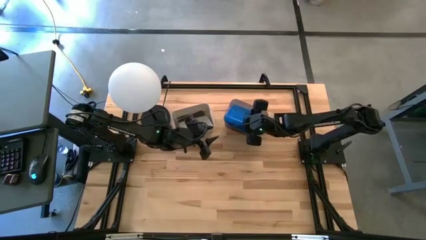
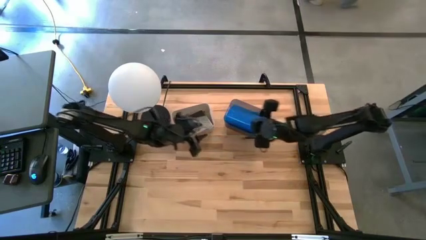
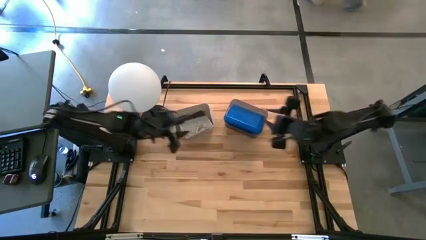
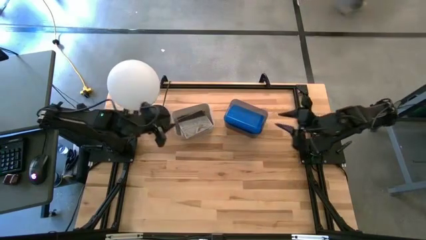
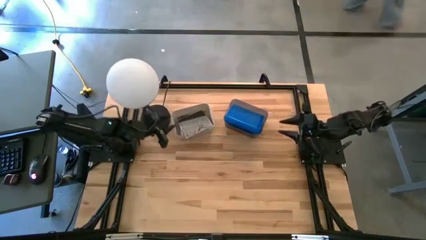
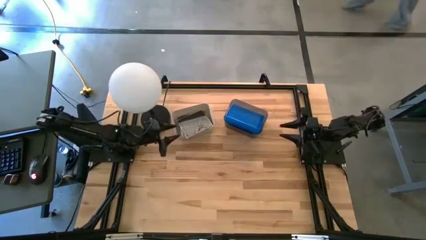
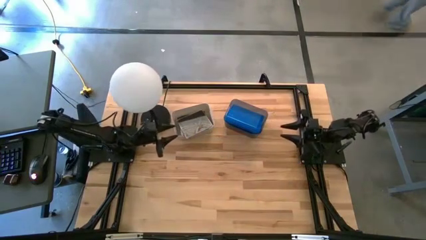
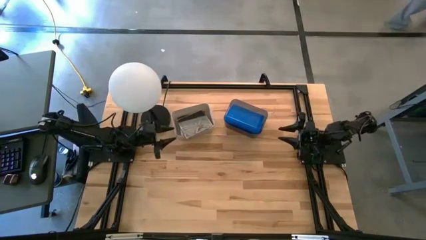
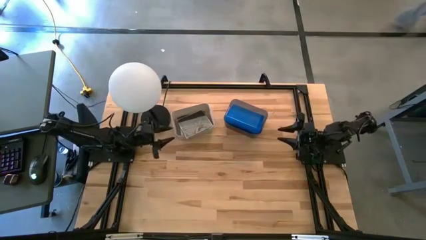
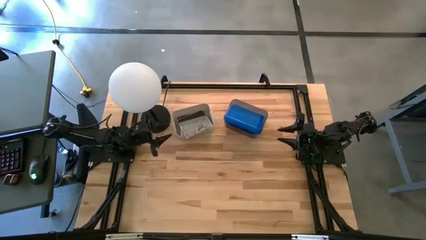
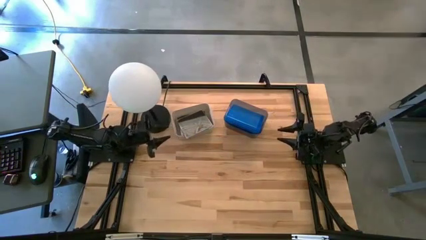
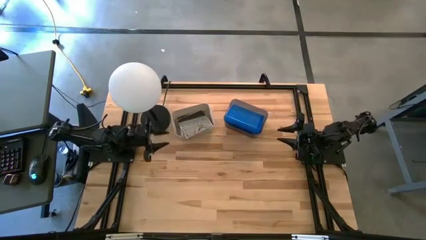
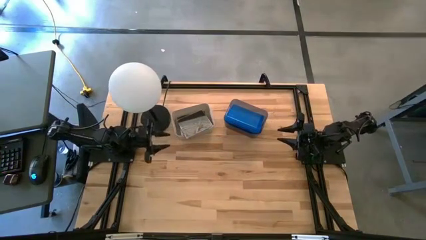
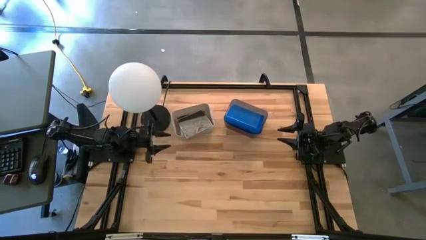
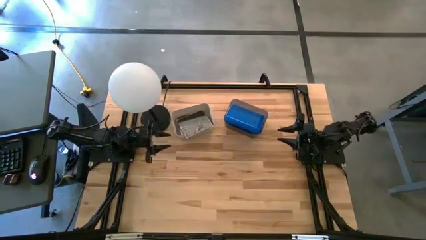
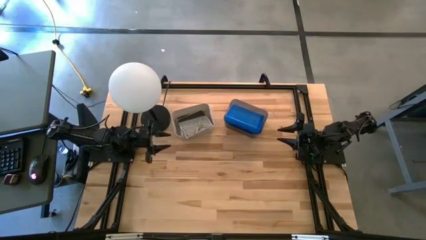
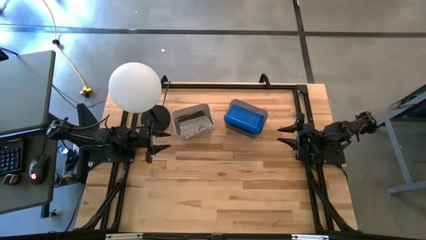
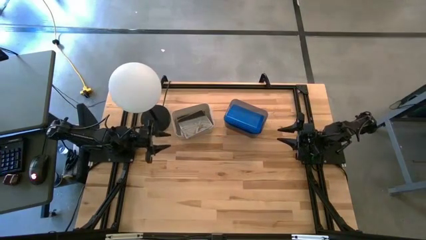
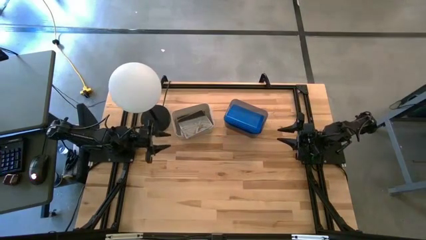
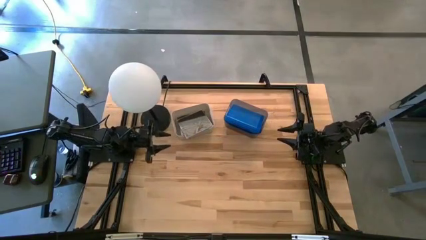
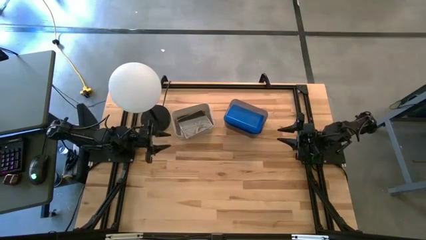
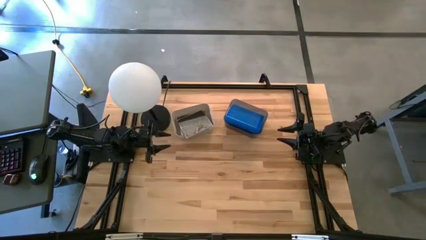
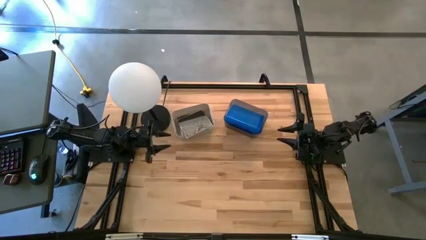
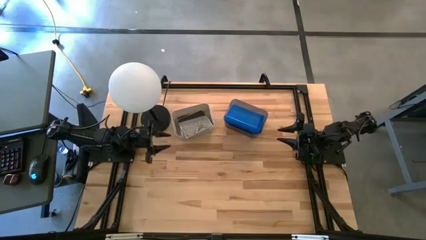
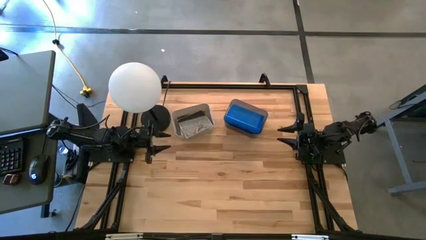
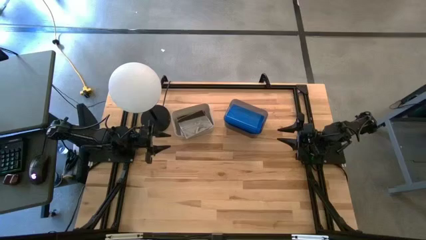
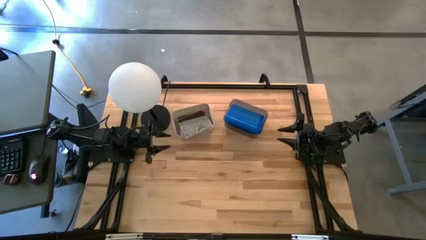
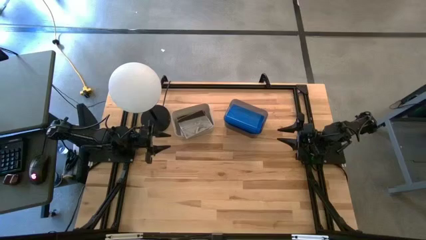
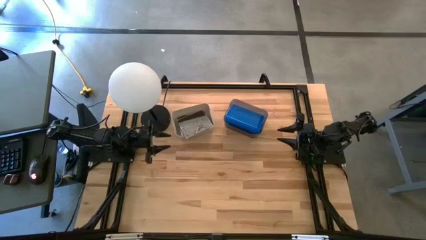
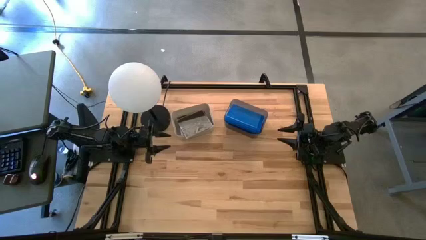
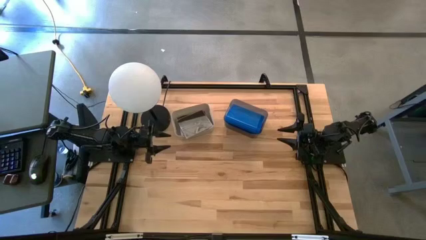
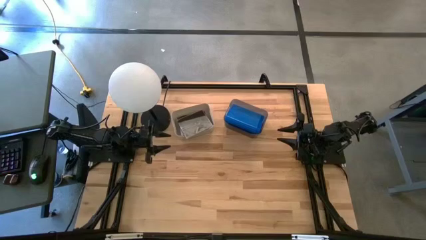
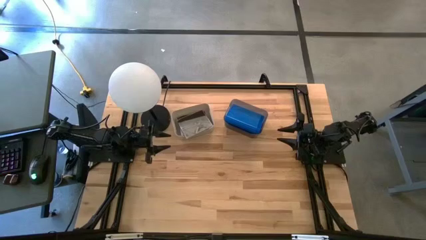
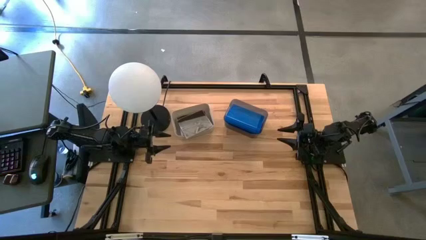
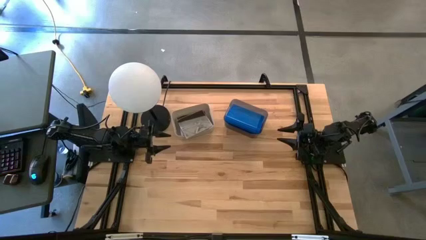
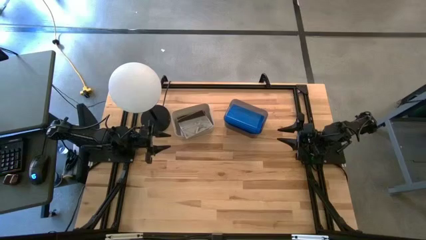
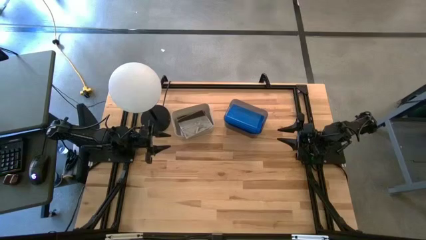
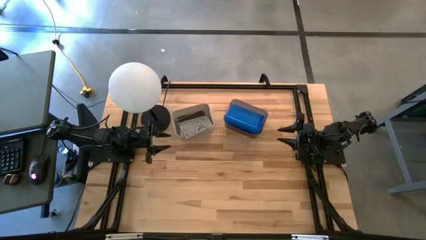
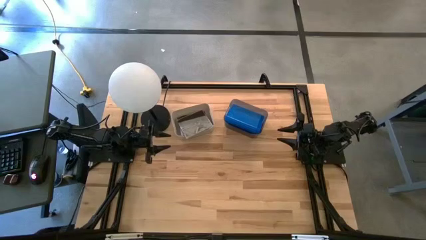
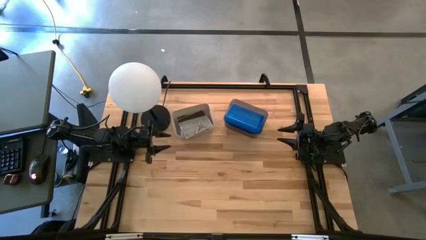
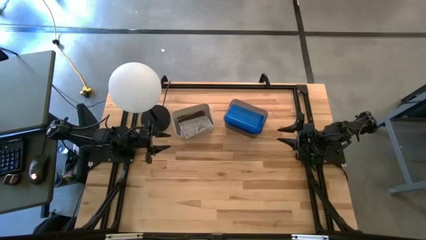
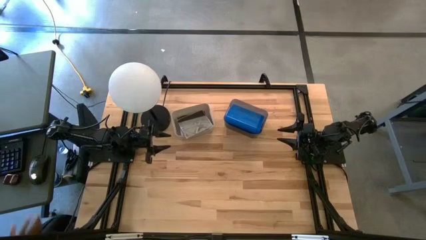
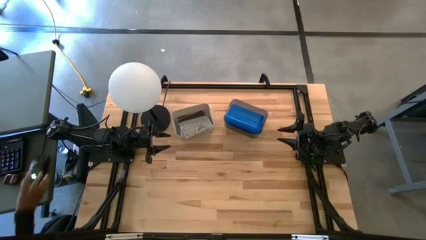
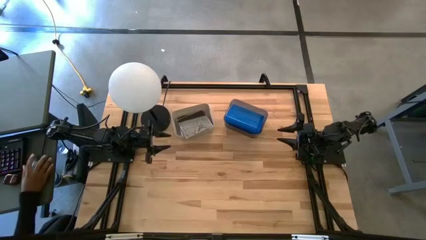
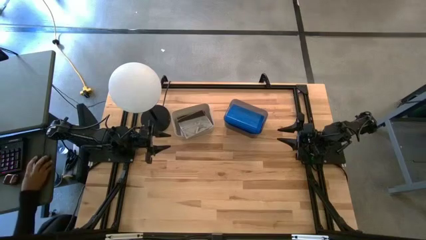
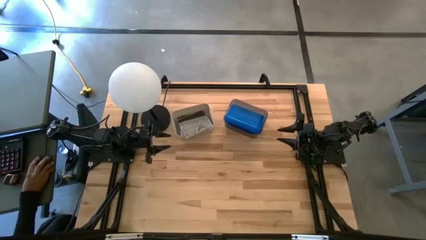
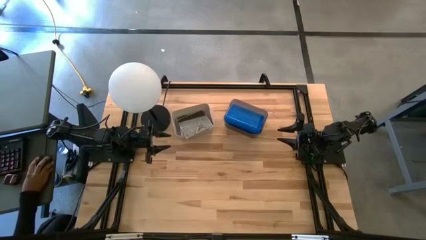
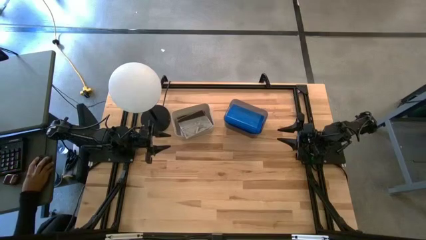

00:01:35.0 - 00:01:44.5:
Task: Pick & place jewel cases by type
Return to Home Position
